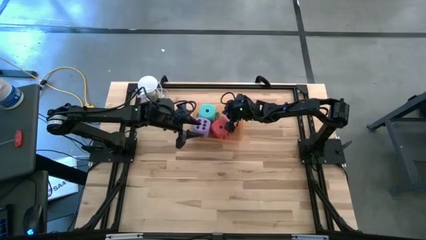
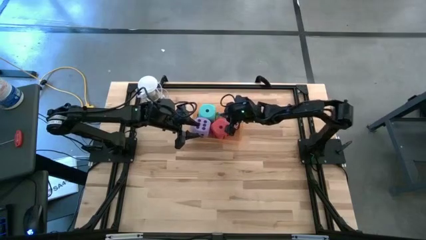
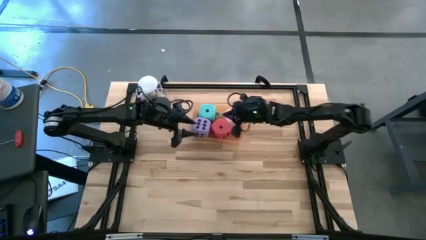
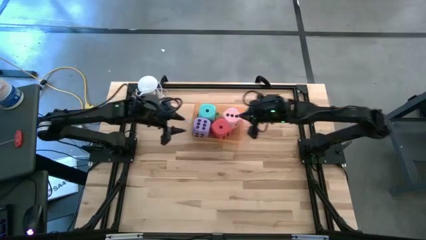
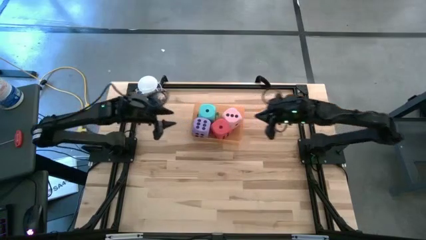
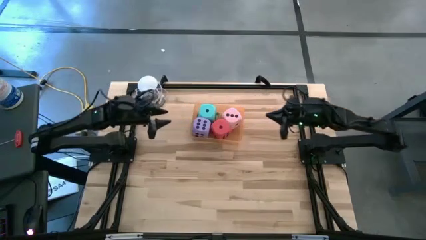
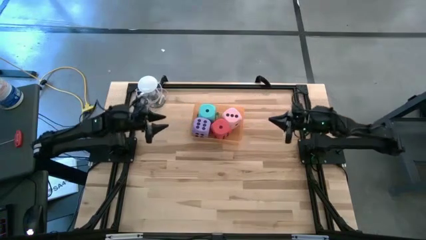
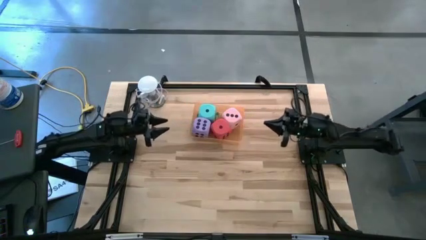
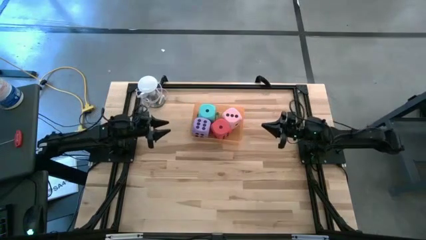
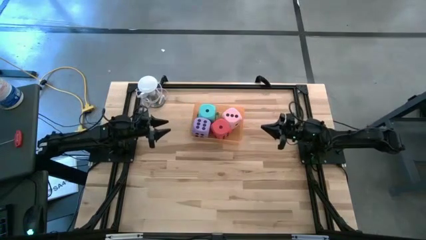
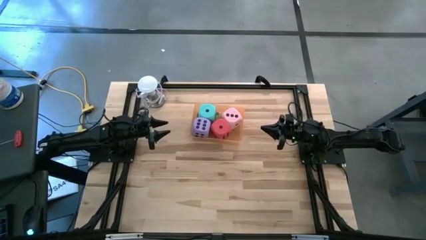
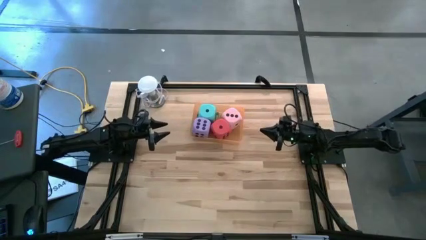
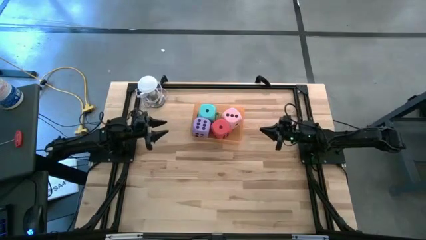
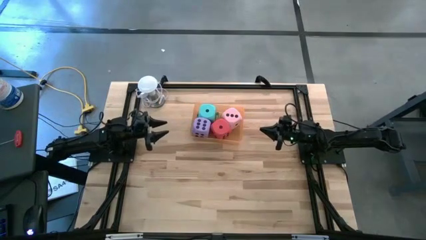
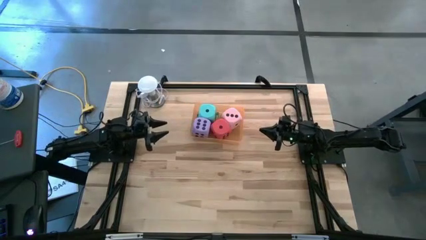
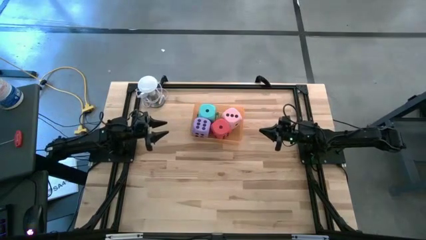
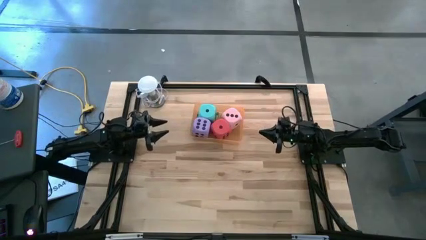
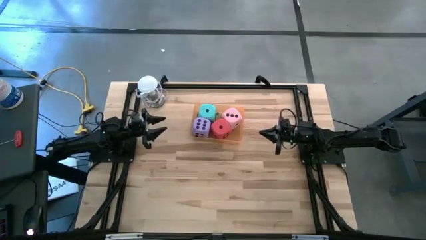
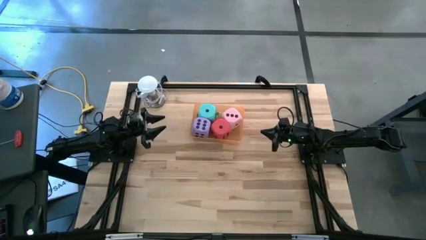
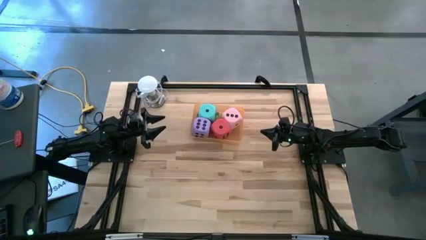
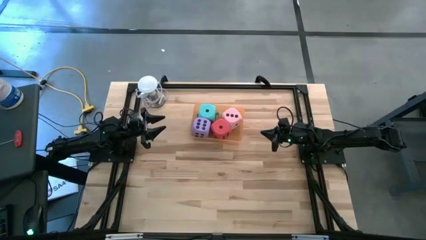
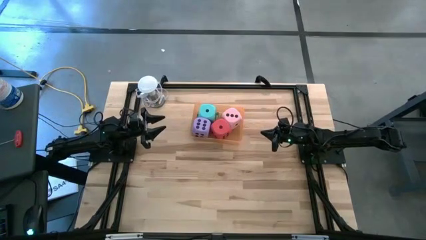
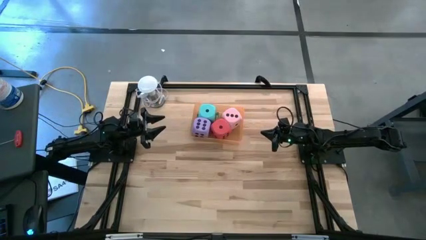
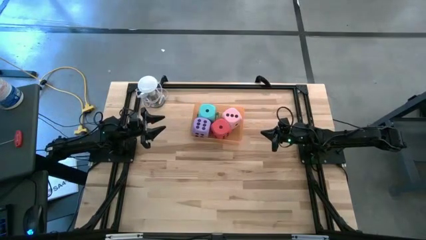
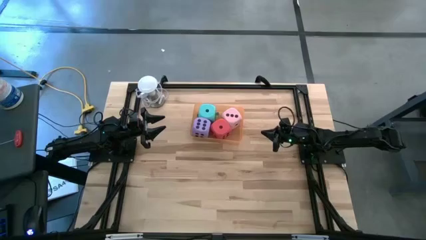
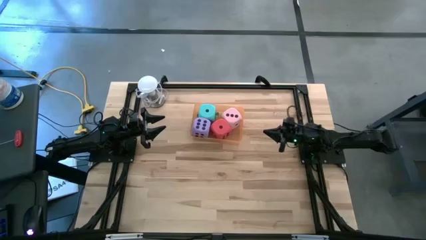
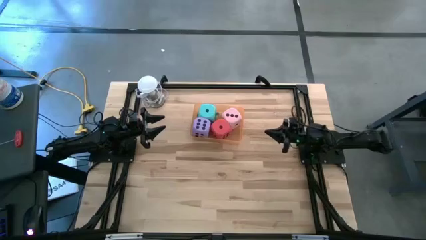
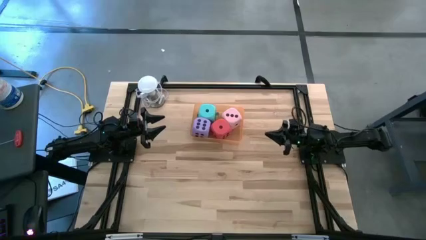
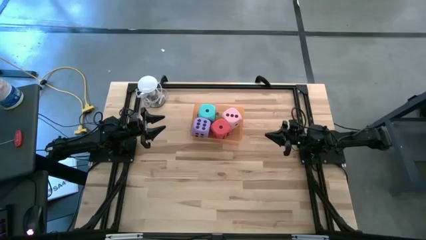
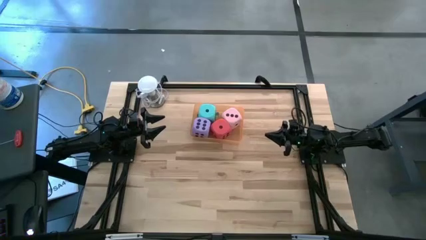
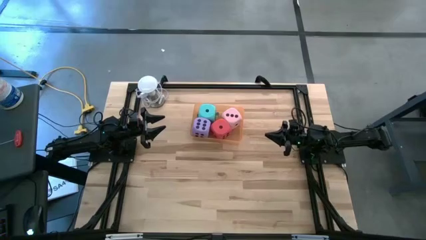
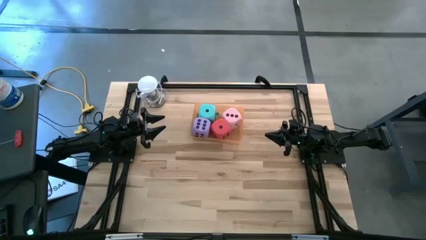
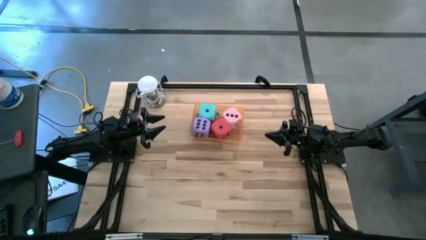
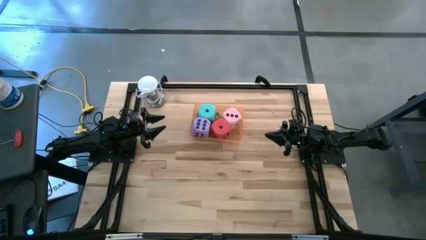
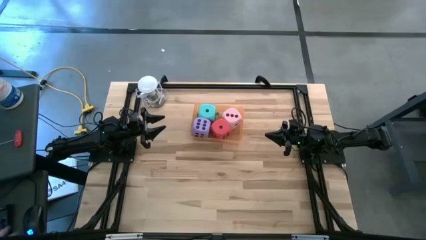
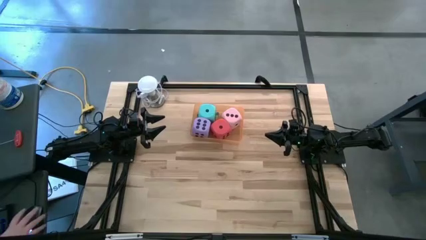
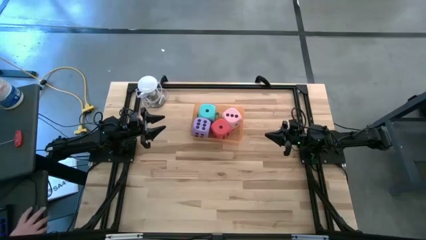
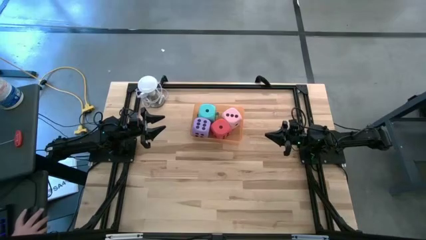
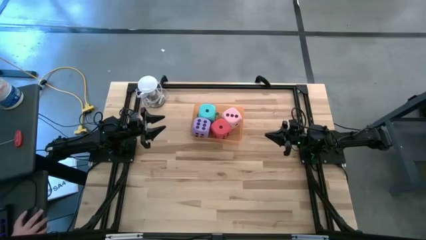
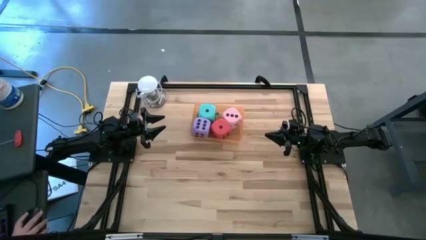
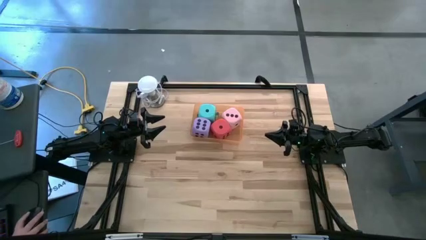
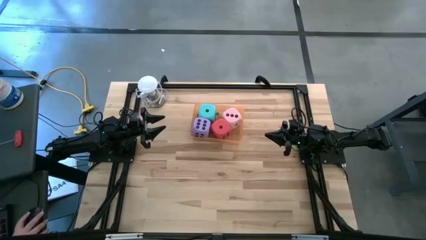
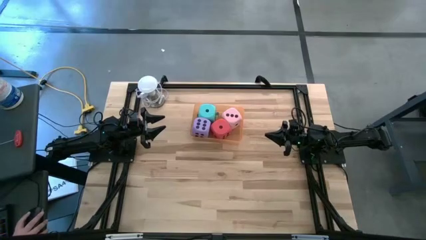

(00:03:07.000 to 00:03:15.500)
Task: Pick & Place Dice
Return to Home Position

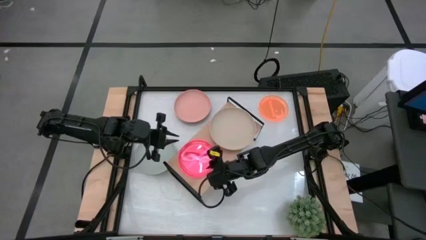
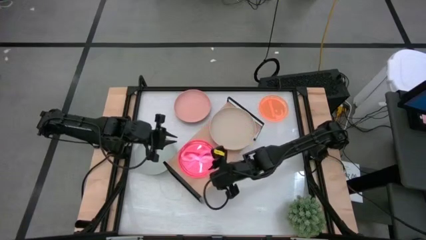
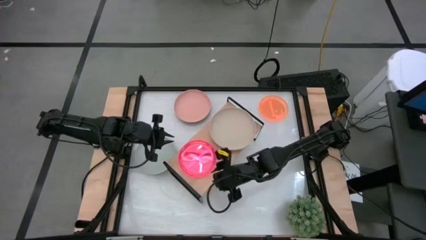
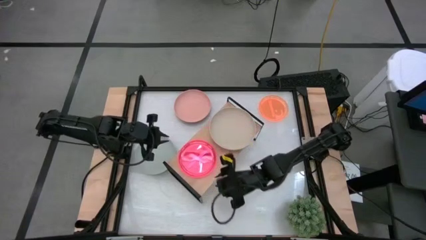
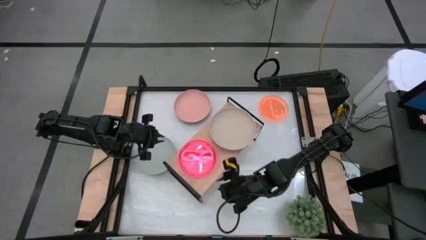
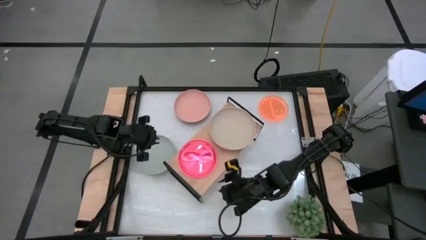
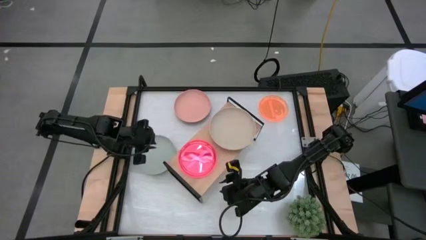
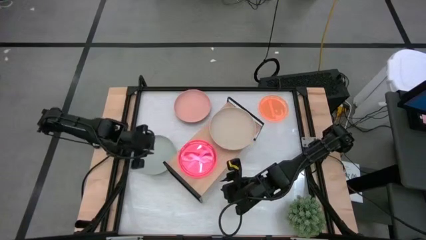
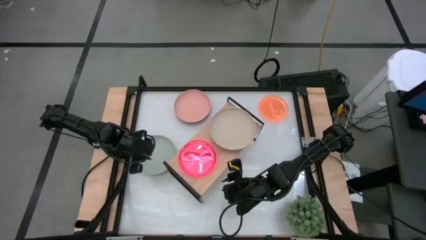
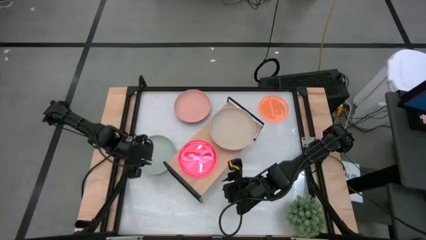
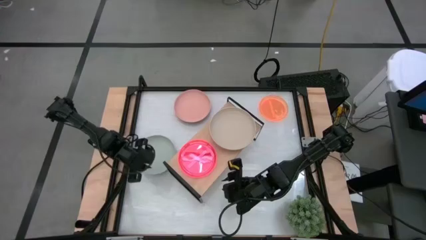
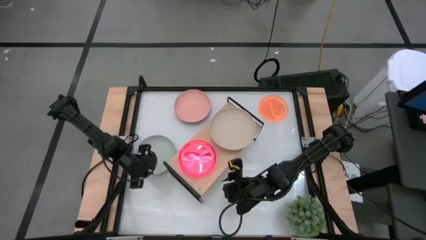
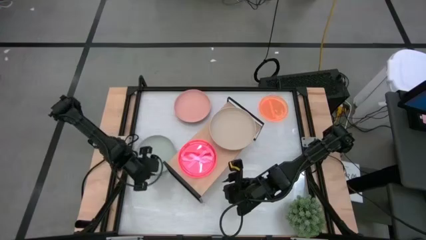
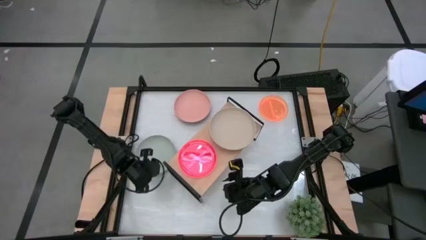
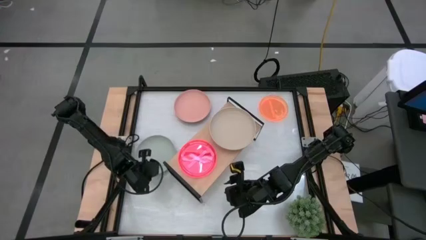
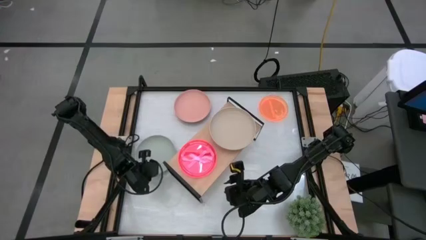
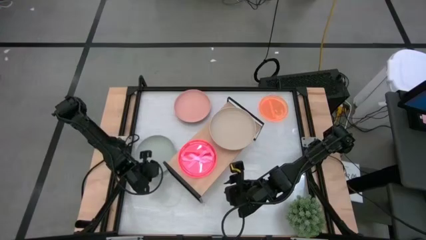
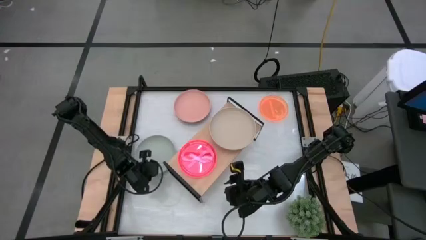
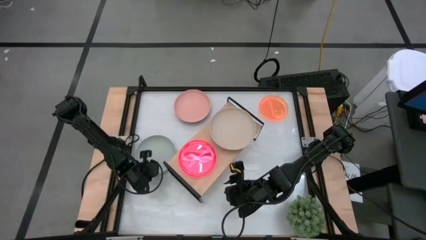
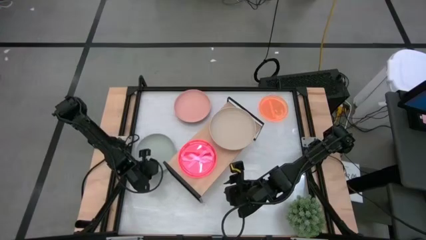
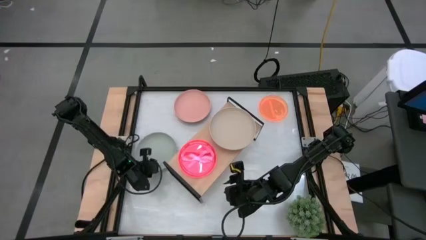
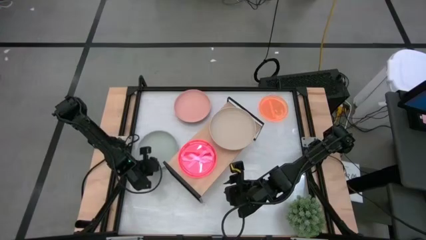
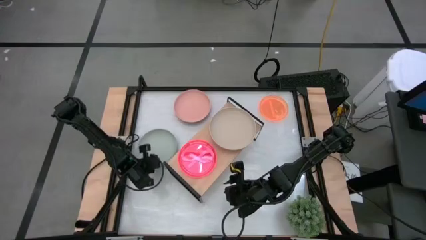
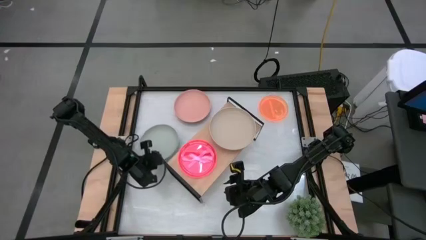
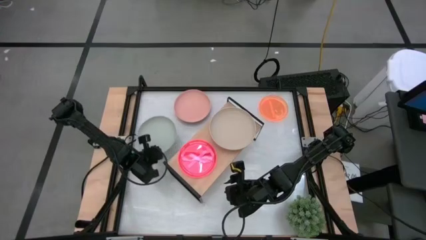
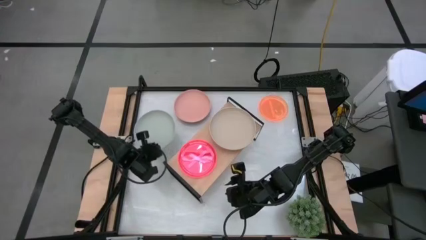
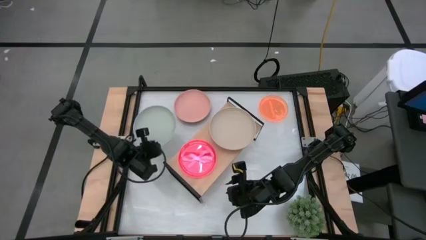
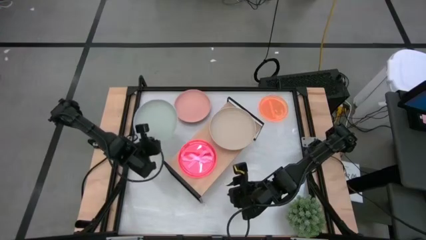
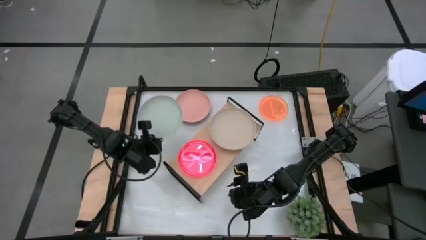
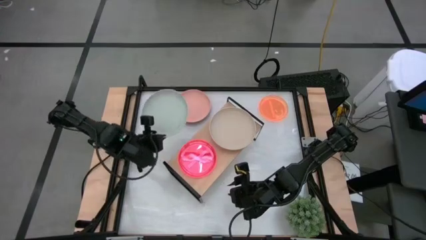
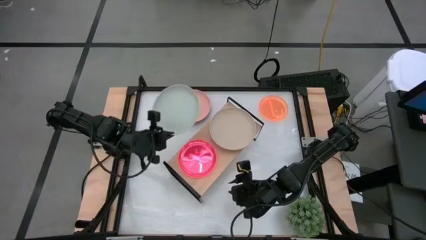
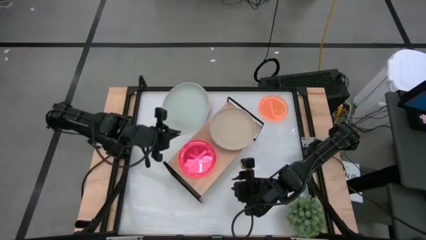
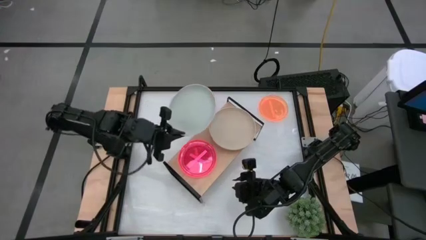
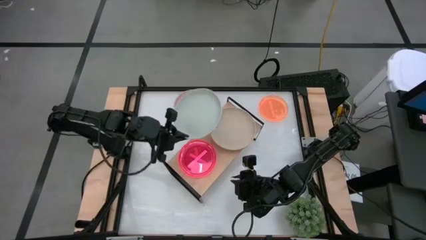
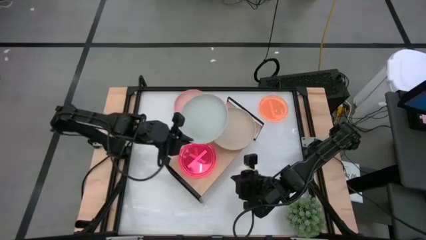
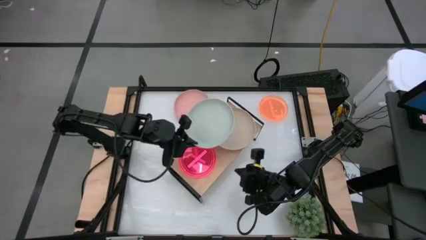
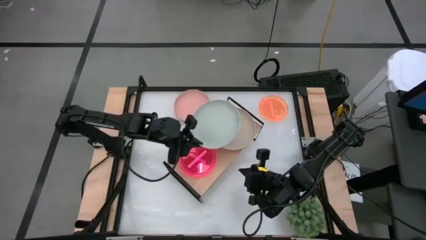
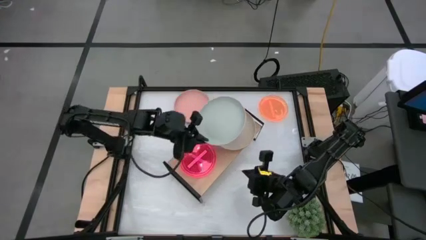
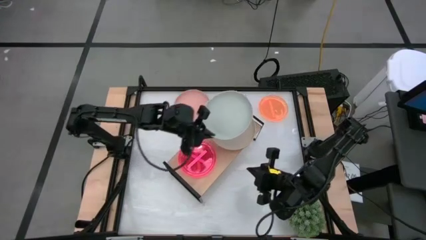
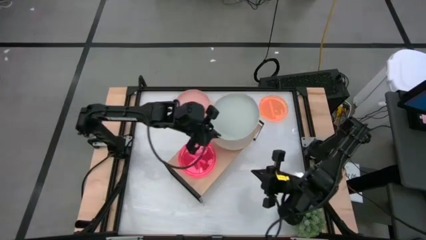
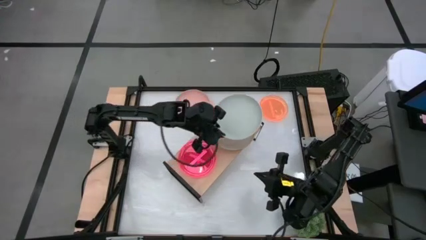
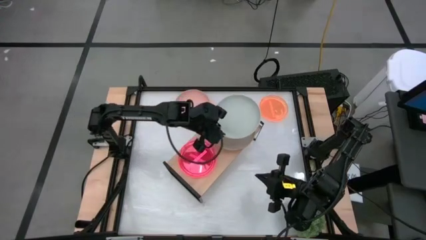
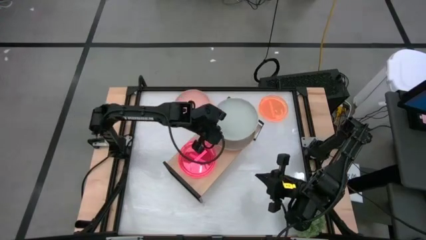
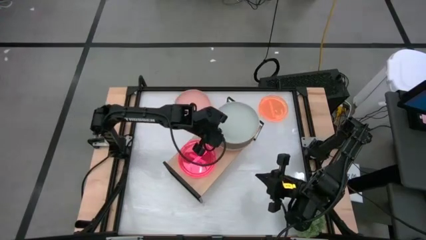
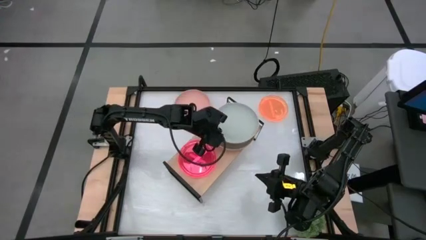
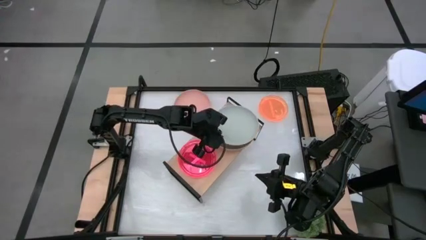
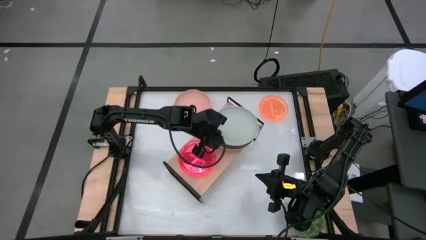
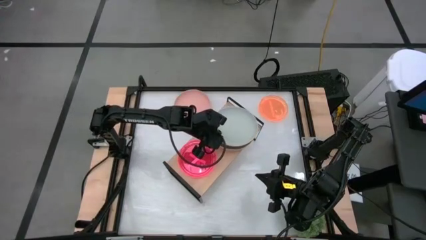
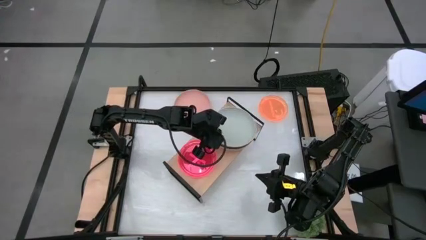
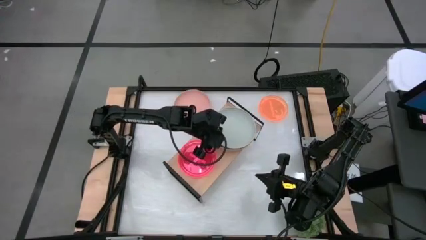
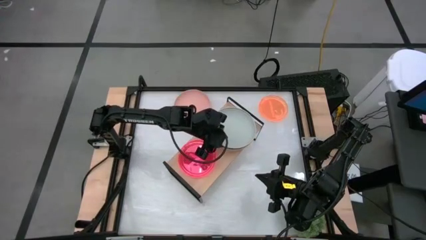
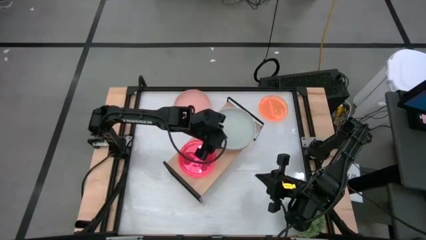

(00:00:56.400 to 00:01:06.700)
Task: Place and stack plates onto a shelf
Stack the big gray plate on top of the big brown plate on the shelf
